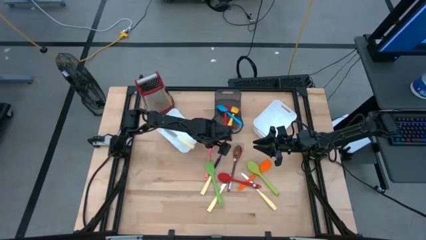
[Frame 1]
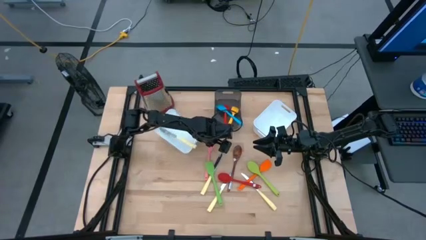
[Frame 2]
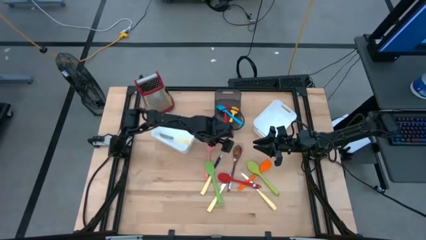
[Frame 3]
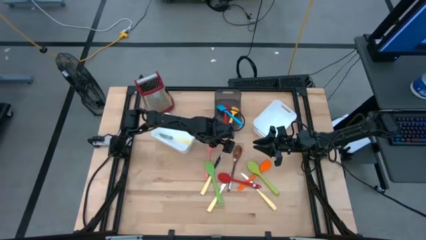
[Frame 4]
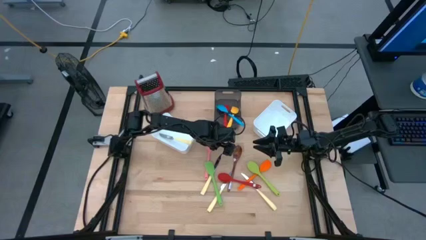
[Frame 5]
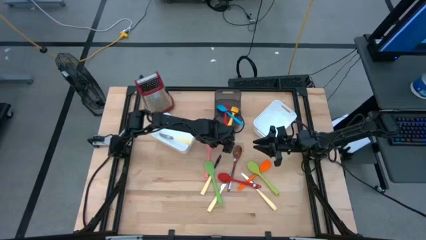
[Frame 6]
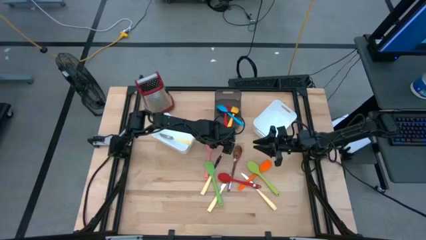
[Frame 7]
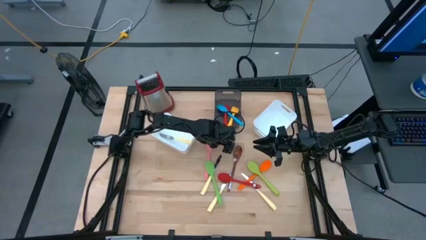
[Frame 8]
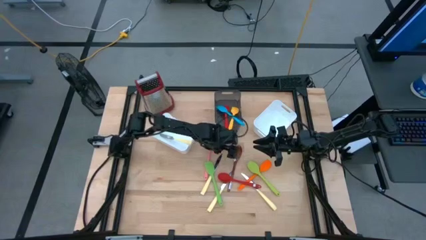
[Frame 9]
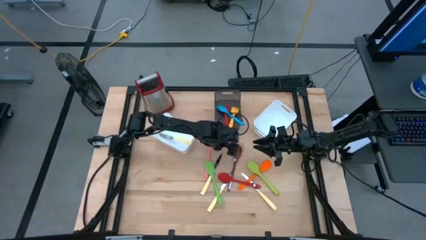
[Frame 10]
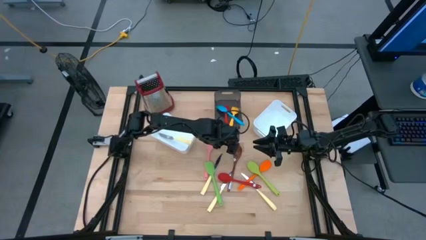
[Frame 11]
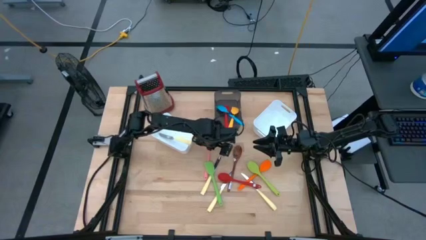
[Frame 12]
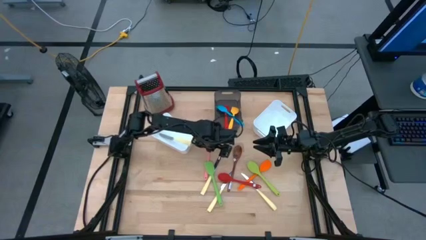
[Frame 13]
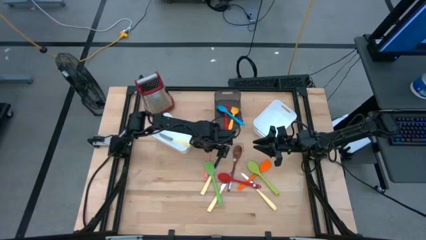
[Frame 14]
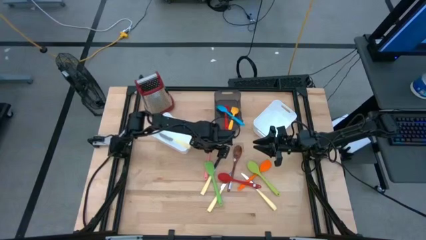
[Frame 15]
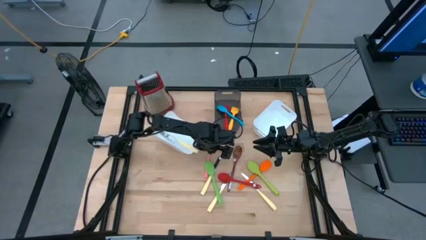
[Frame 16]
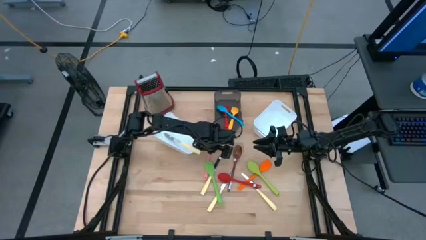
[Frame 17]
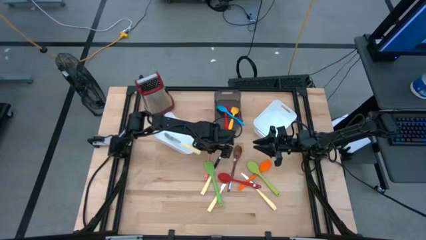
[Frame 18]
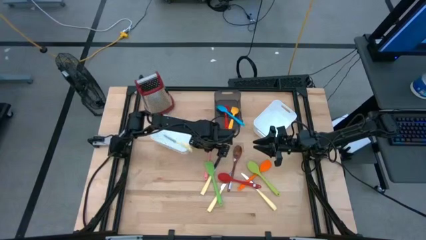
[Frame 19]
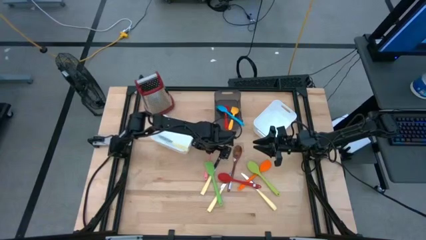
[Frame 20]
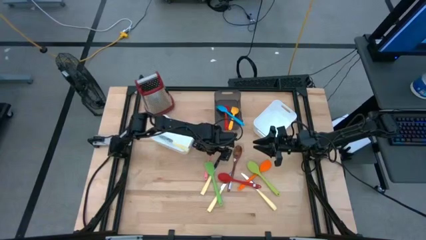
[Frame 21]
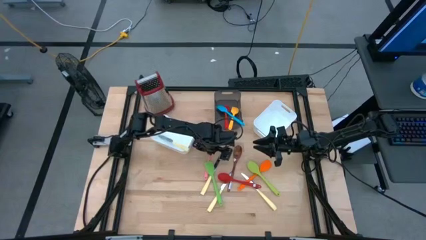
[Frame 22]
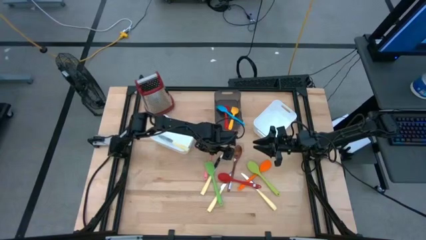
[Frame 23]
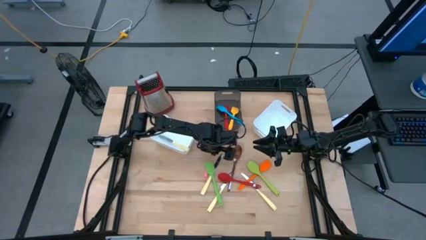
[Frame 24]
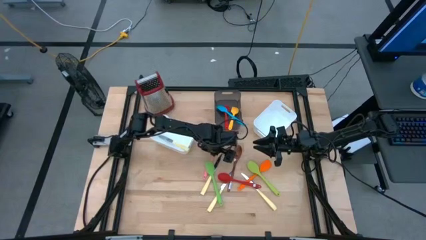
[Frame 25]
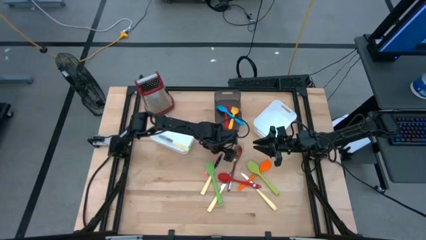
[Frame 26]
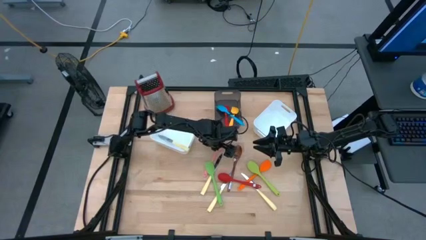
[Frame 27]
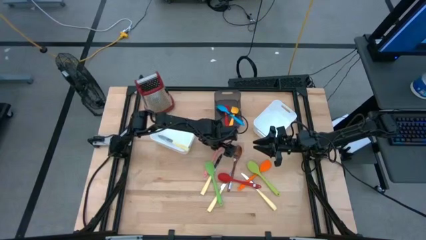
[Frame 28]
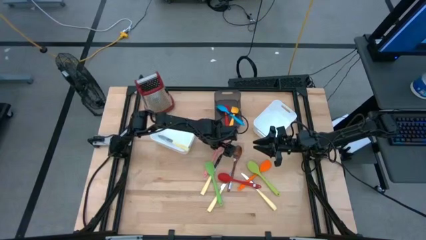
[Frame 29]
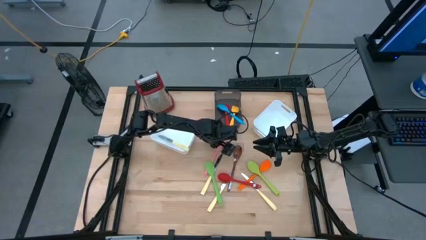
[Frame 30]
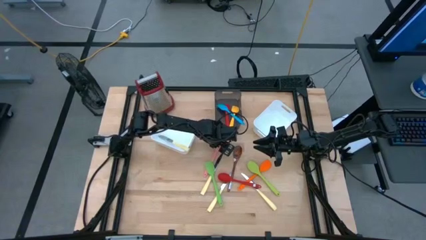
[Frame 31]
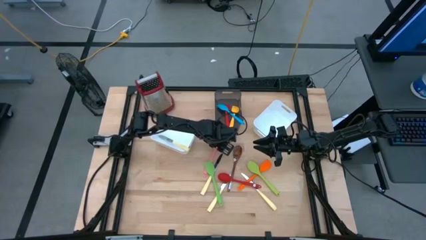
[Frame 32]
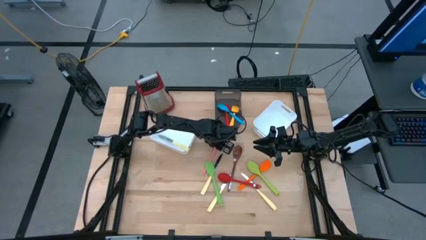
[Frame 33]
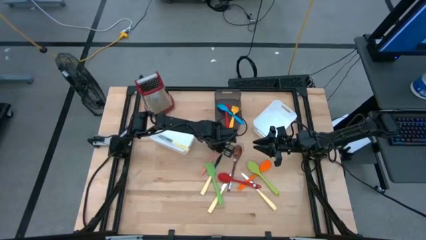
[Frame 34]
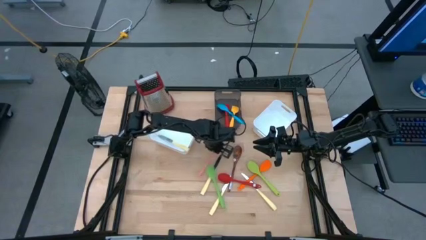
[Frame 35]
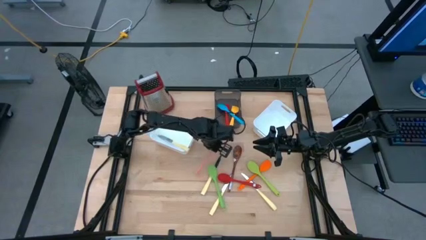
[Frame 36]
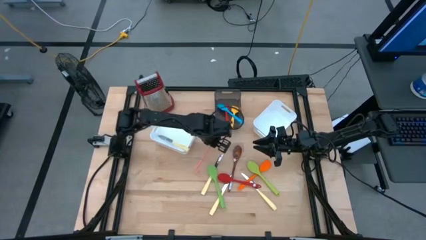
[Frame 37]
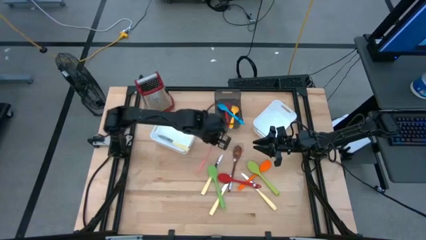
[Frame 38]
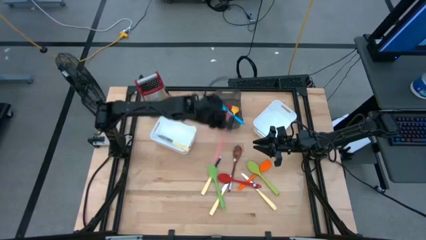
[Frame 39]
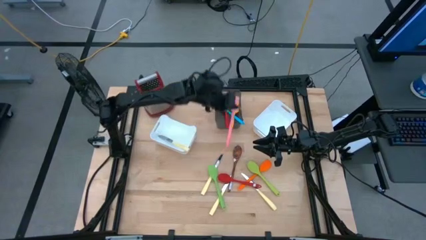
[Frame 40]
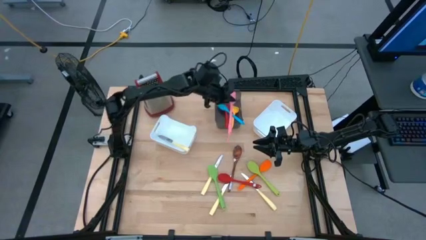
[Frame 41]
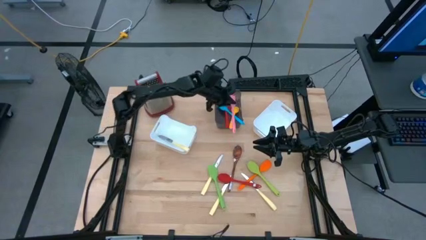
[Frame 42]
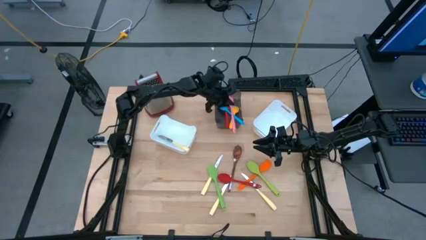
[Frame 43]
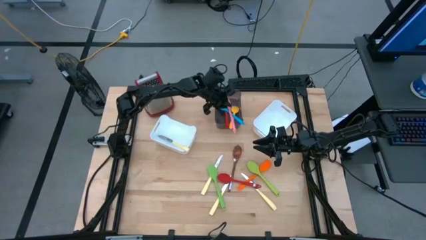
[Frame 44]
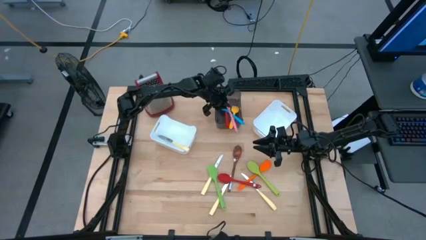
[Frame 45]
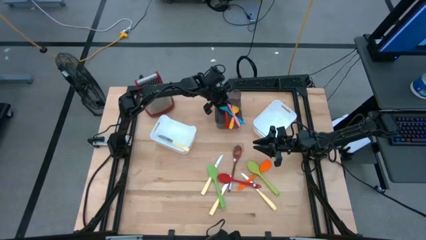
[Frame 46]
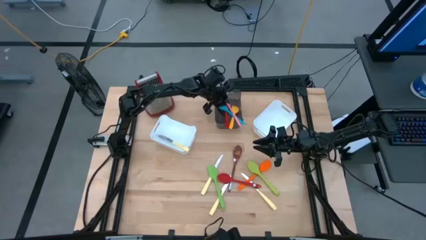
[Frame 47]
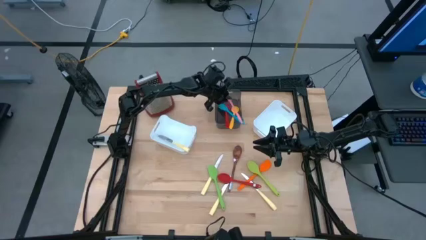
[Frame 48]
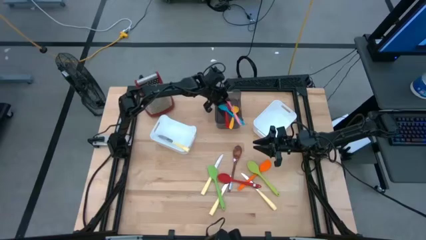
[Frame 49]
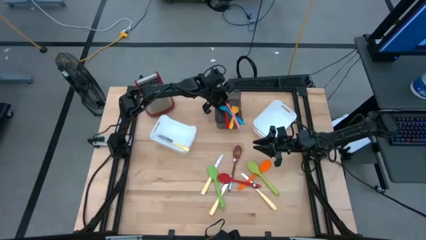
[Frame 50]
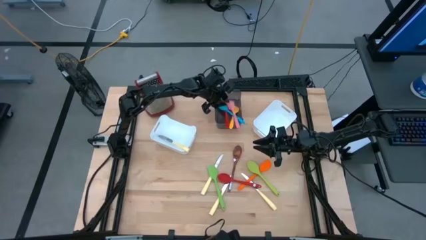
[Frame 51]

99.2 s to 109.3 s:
Task: Pick & Place Kitchen Items
Put the pink spatula into the black bin
